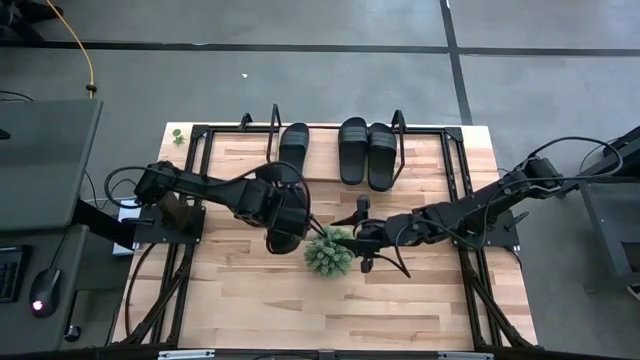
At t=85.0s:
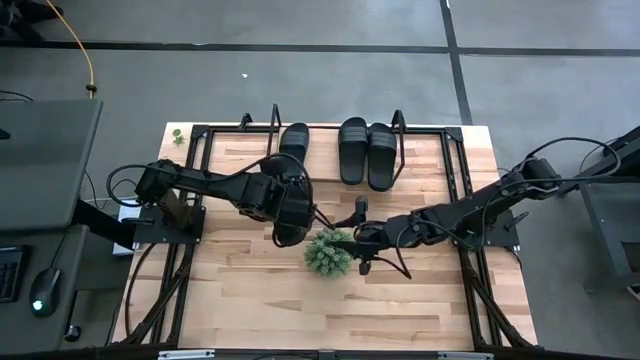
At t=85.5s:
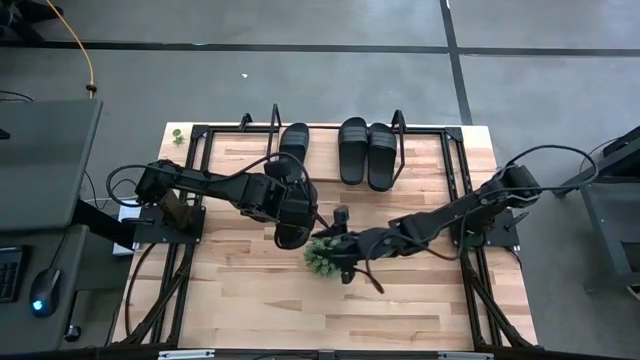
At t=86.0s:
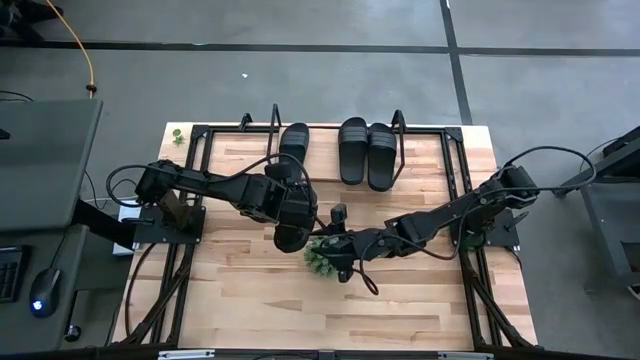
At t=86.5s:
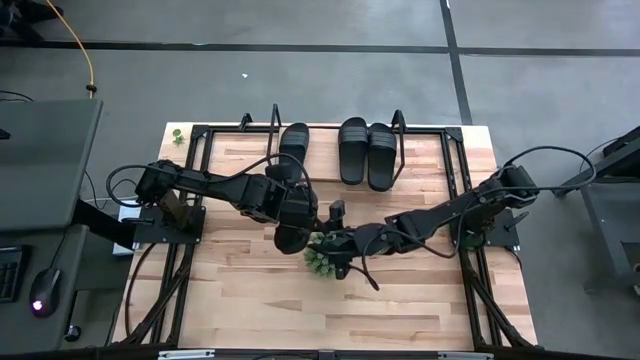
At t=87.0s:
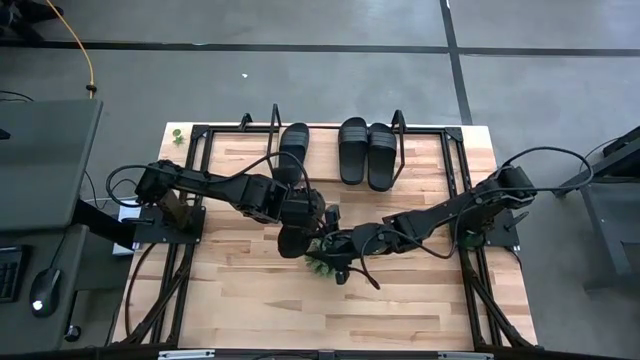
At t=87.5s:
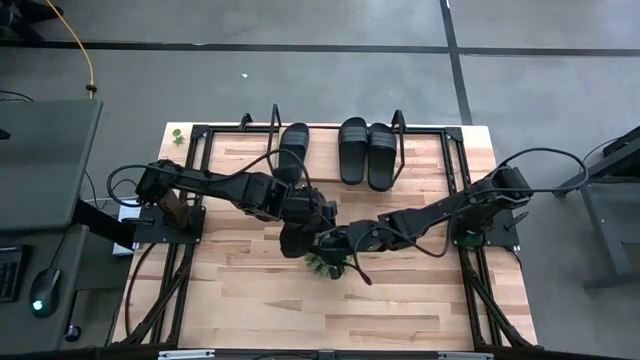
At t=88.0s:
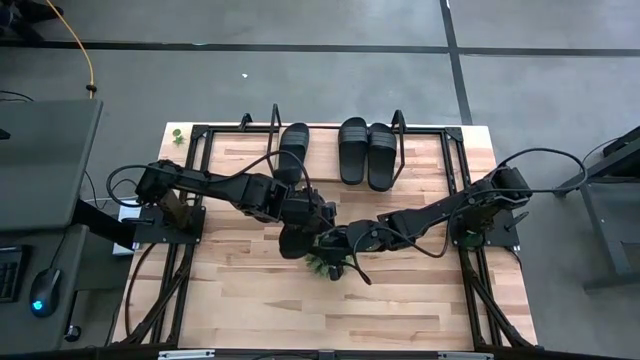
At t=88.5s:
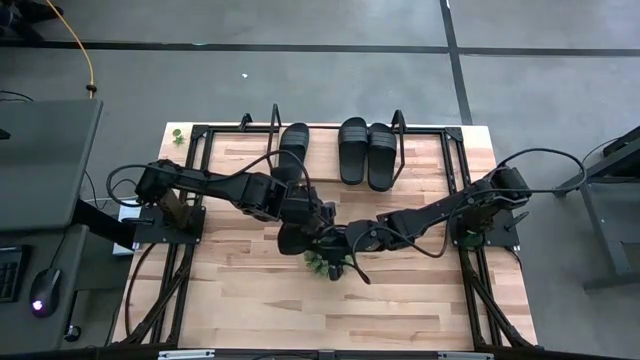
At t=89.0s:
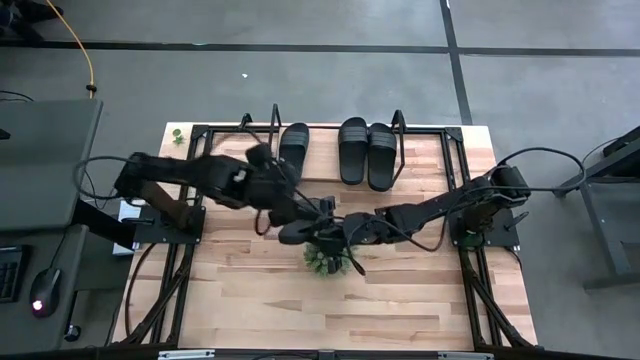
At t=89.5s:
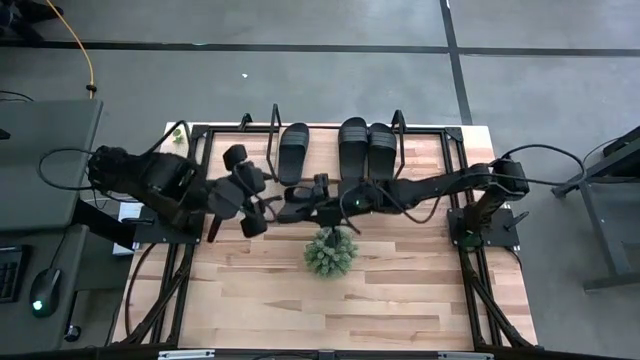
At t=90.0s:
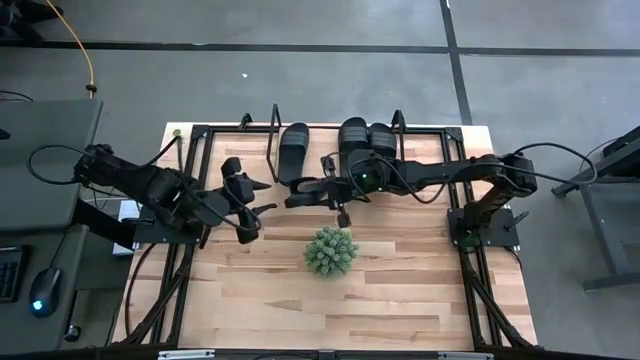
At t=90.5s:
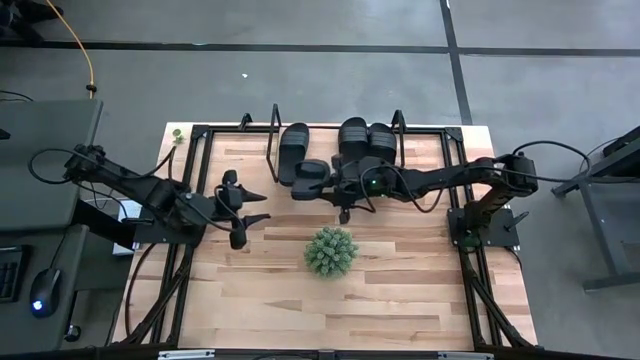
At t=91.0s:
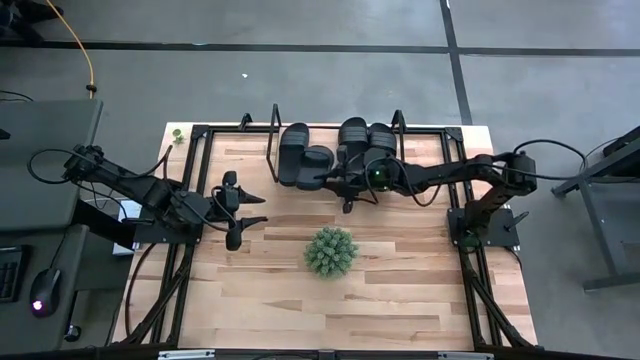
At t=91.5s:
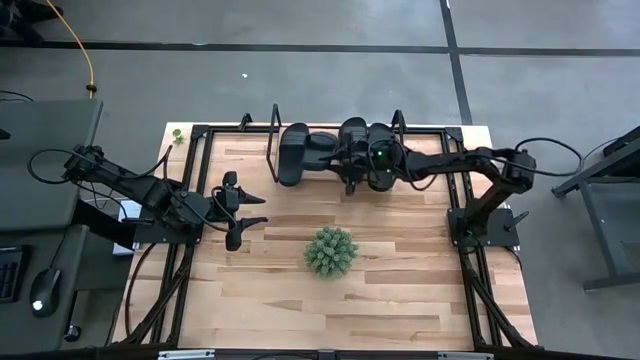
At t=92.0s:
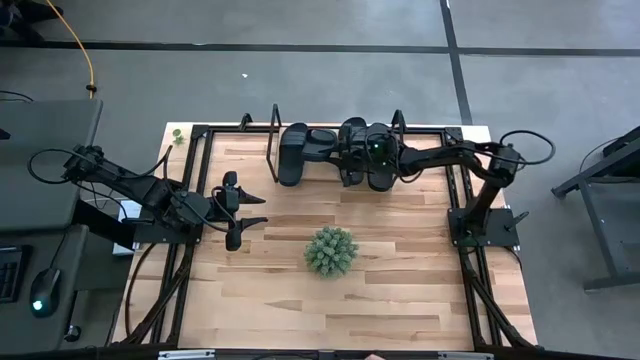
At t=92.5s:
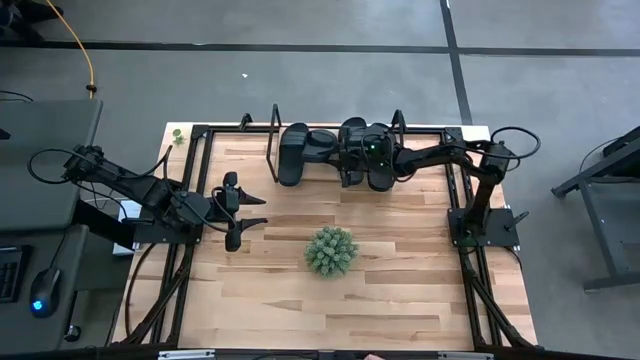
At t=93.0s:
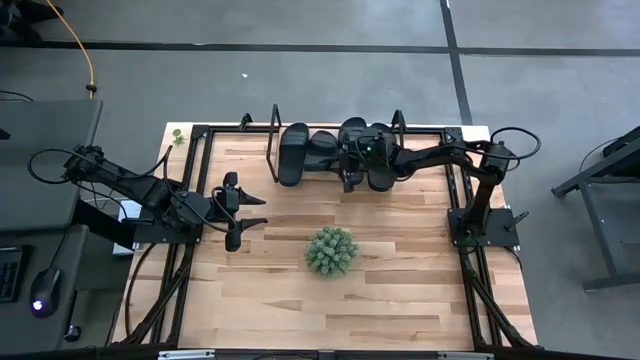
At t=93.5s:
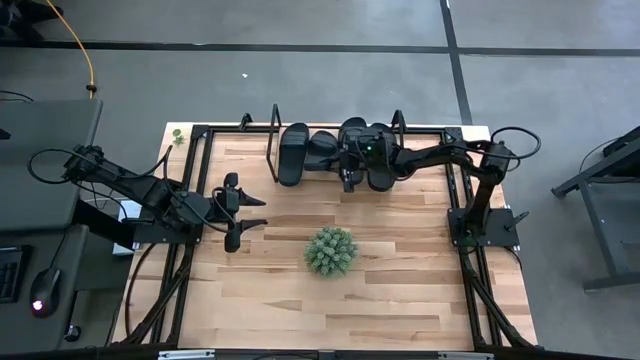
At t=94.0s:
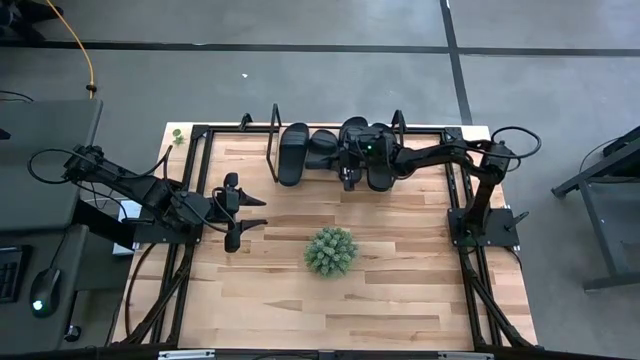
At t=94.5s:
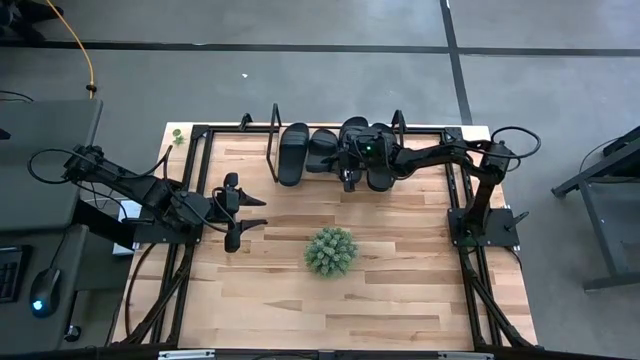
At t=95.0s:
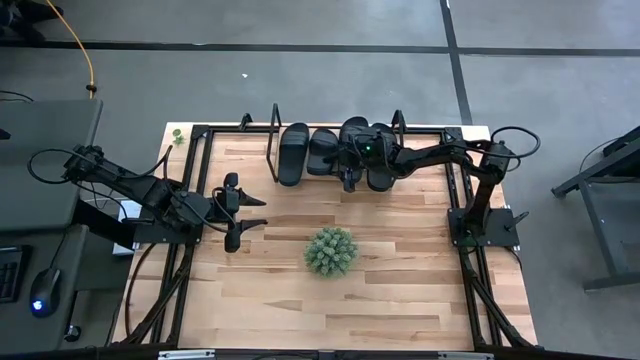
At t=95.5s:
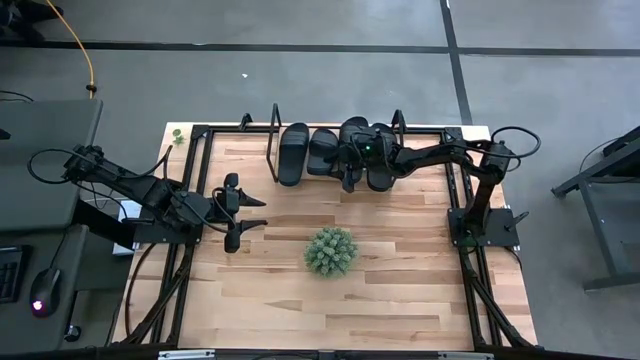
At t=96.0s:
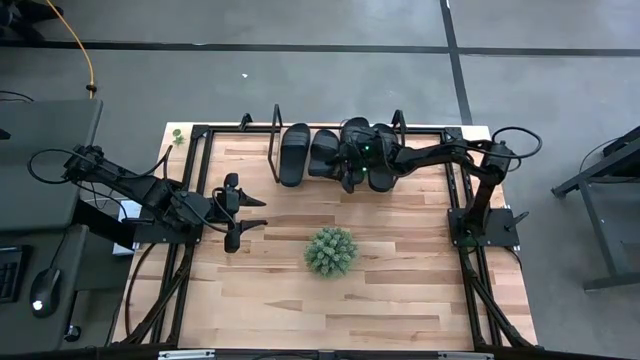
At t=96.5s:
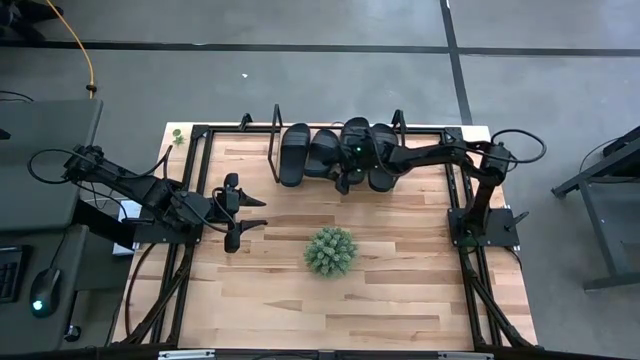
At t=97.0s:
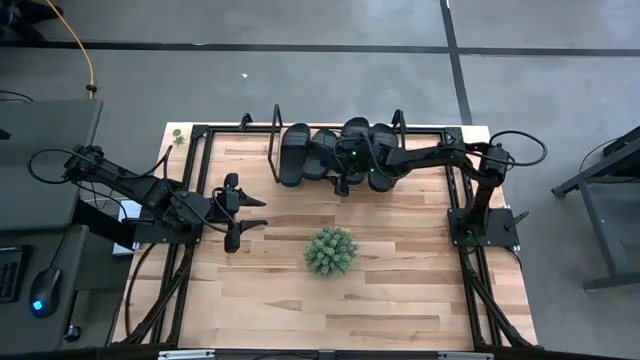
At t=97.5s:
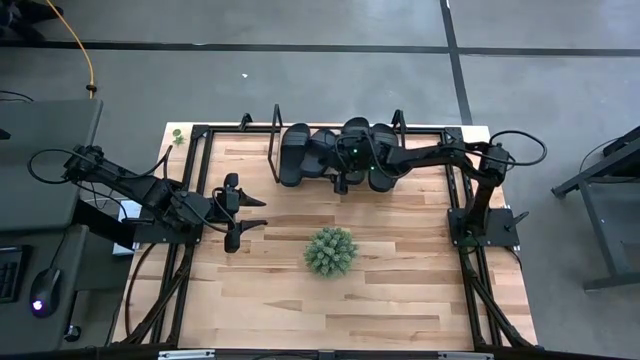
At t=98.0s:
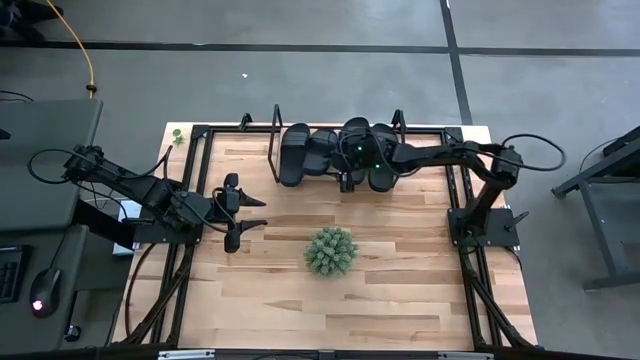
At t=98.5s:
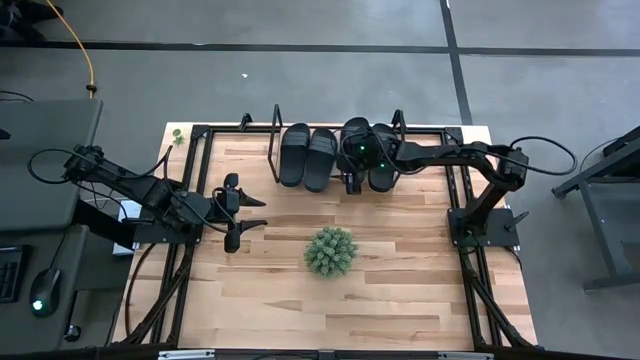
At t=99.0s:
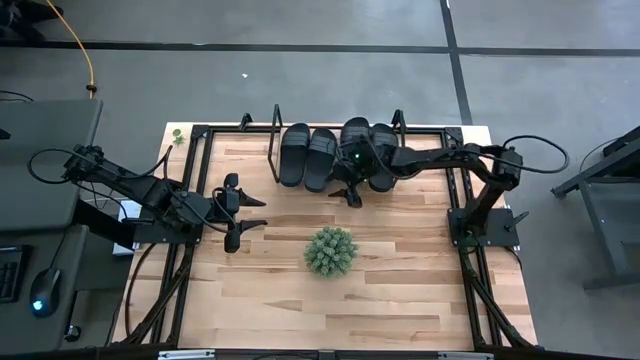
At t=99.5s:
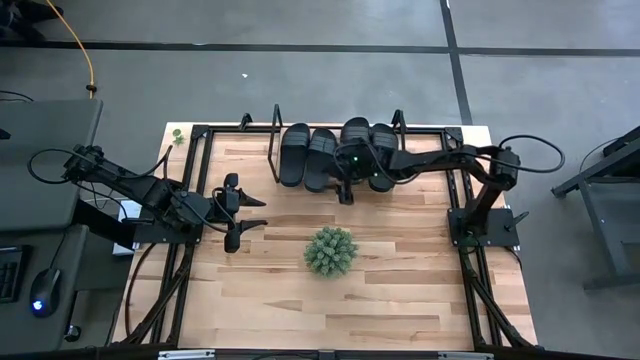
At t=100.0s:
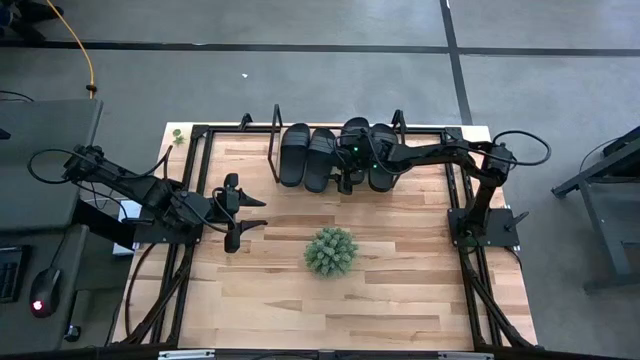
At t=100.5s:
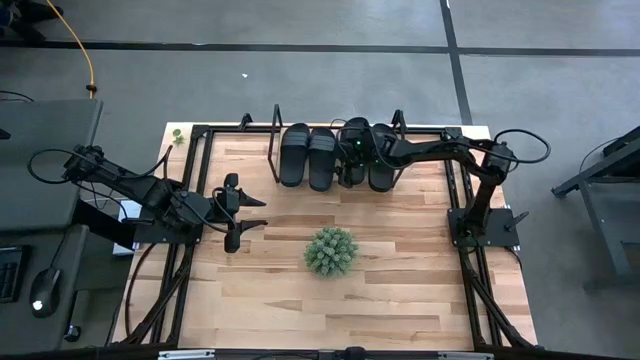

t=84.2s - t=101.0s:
Task: Pick and place slides into the shelf
Put the black slide on the shelf

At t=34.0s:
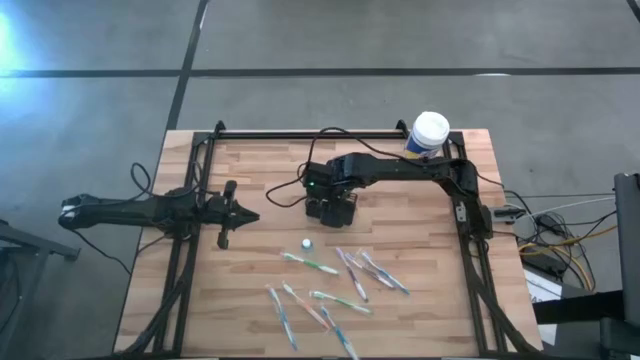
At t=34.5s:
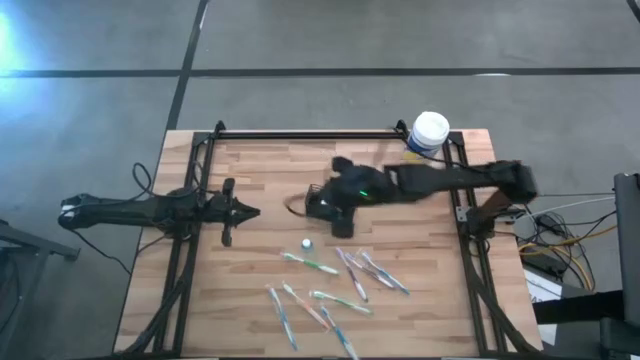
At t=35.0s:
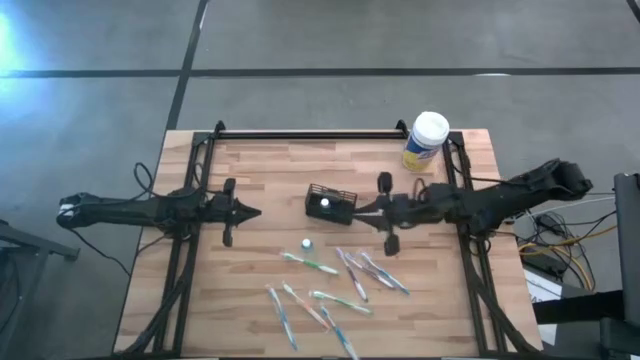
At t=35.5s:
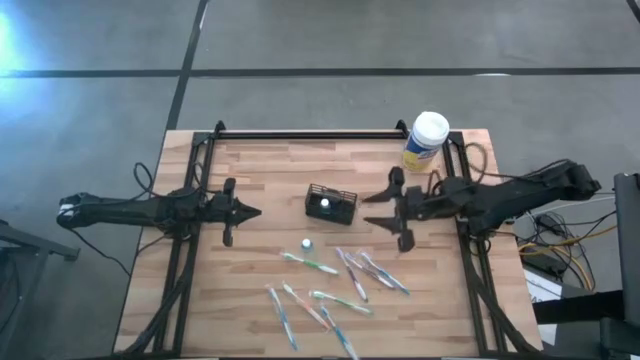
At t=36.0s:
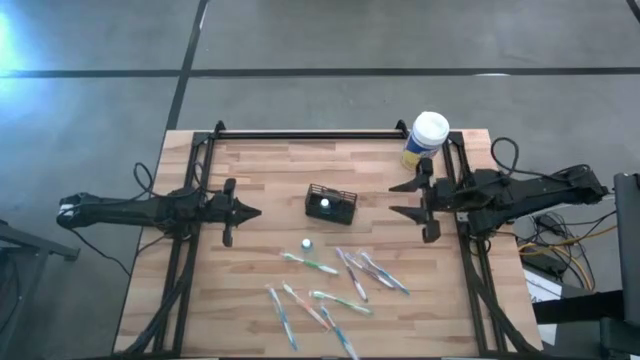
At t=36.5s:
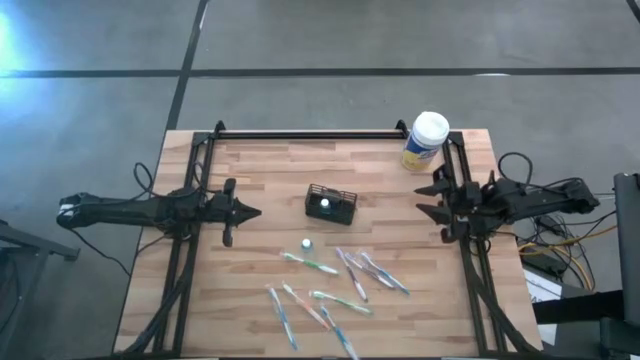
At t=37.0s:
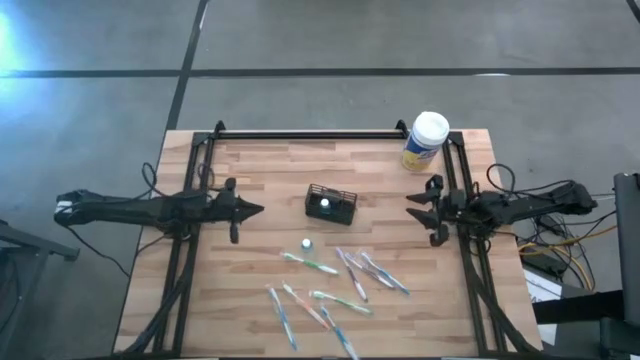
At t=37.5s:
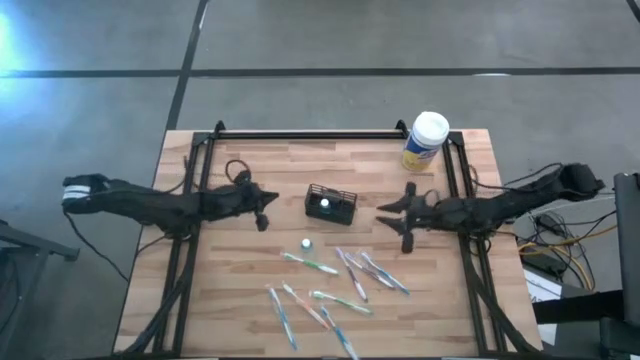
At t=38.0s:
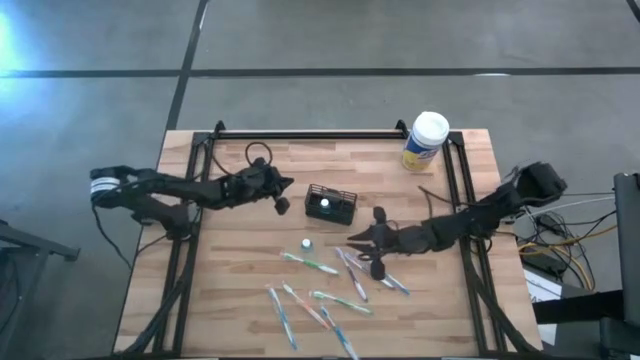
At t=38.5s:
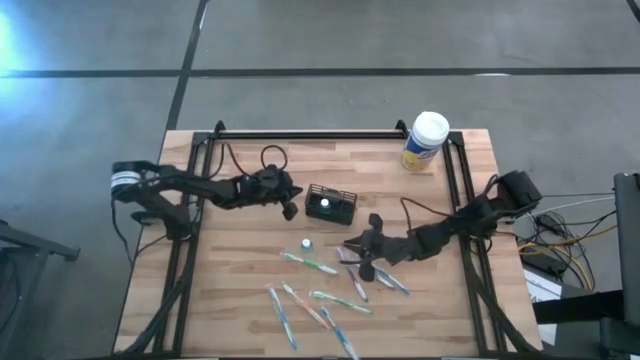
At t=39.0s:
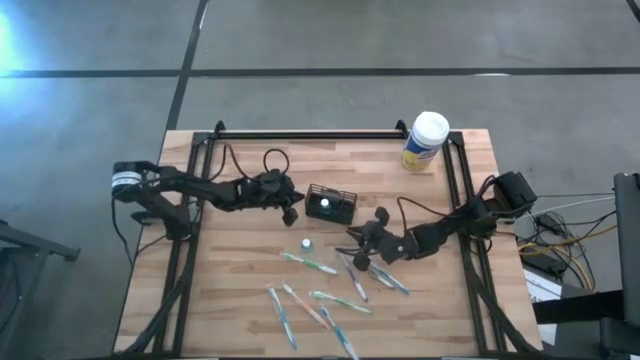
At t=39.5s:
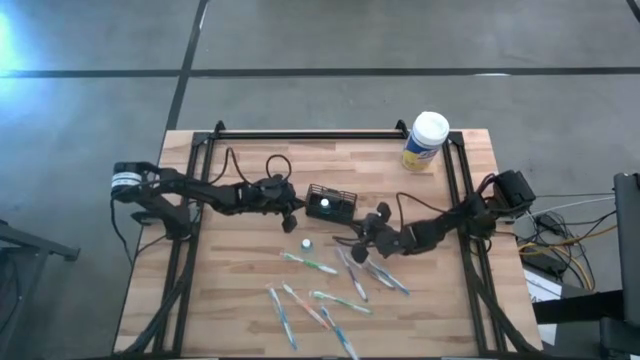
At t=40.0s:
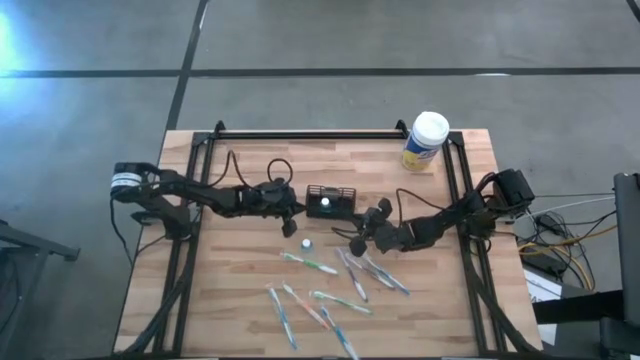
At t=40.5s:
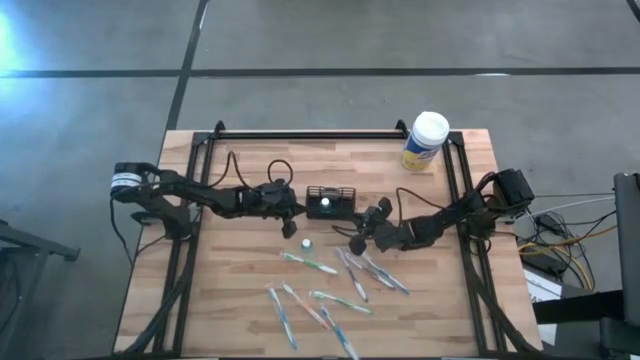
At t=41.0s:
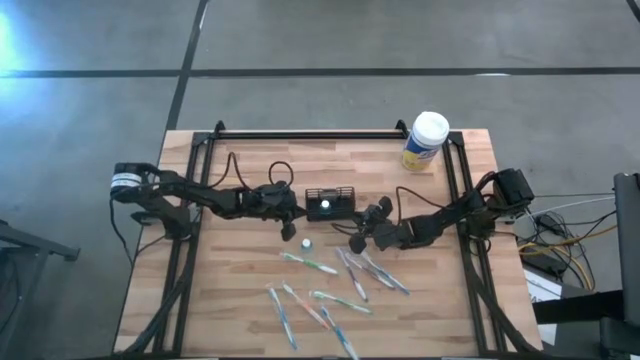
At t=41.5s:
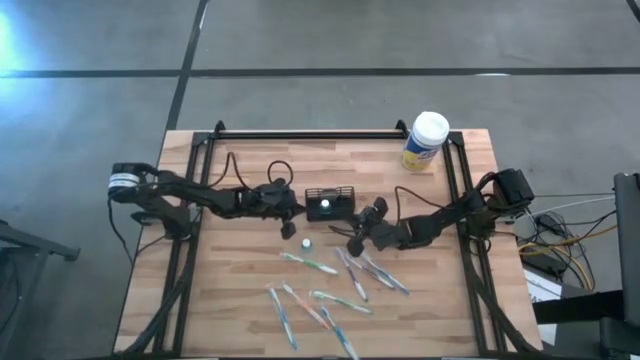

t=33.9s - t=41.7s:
Task: Pick & Place toothbrushing station
Adjust the black organizer
